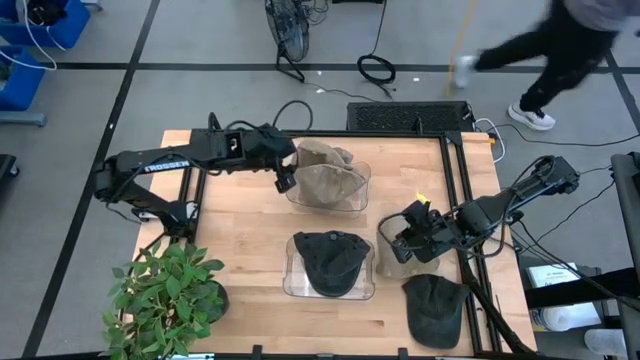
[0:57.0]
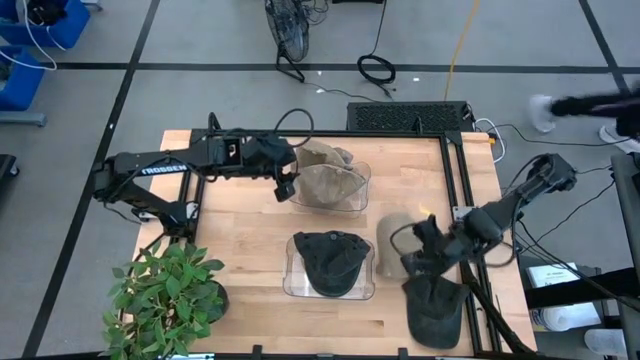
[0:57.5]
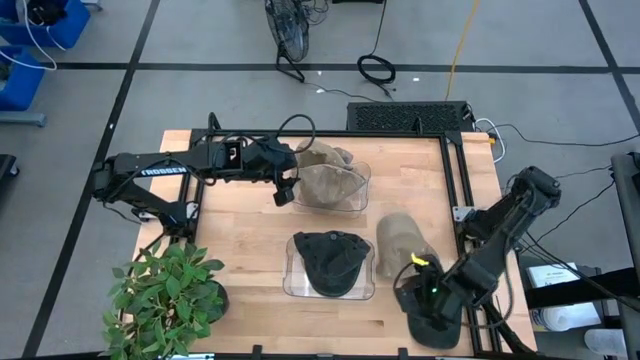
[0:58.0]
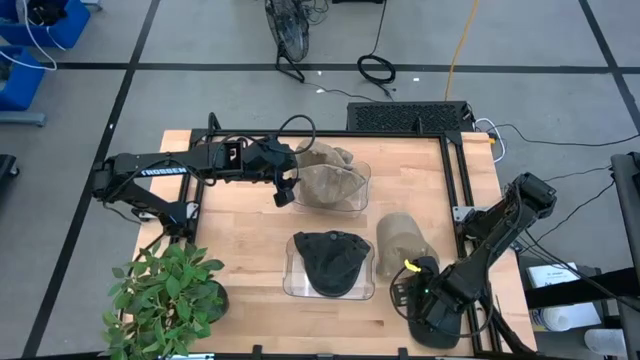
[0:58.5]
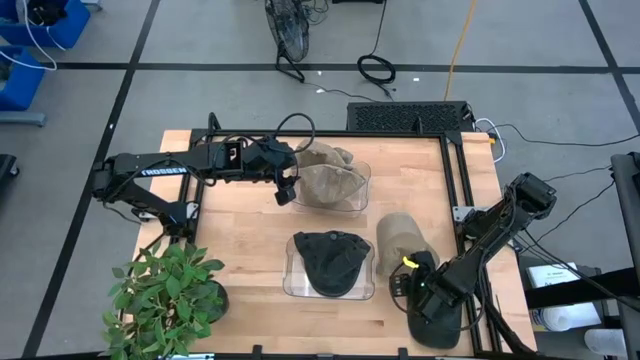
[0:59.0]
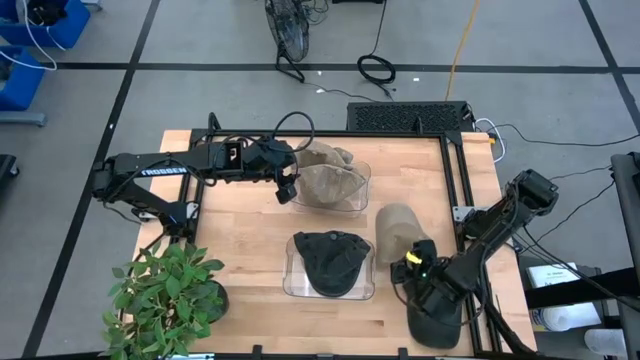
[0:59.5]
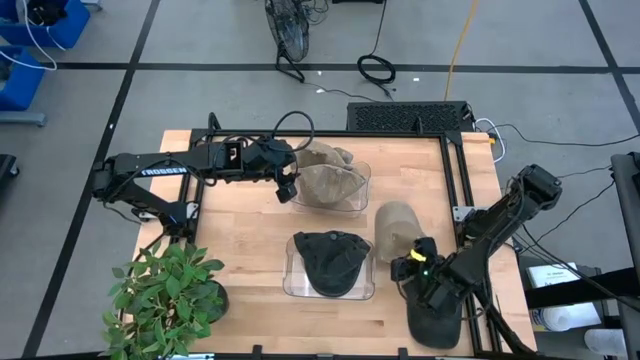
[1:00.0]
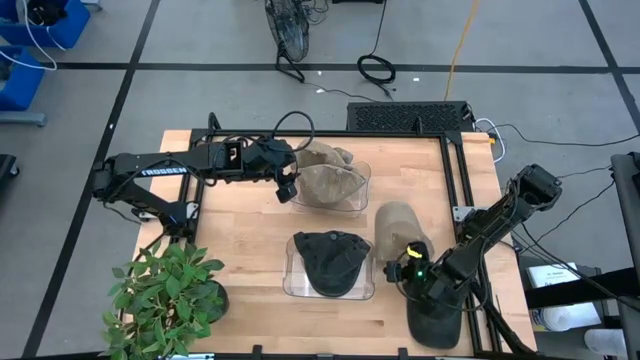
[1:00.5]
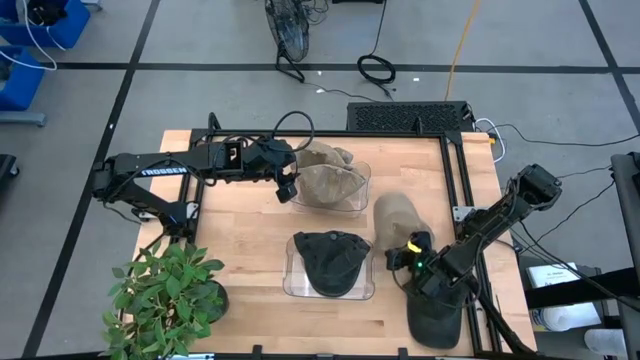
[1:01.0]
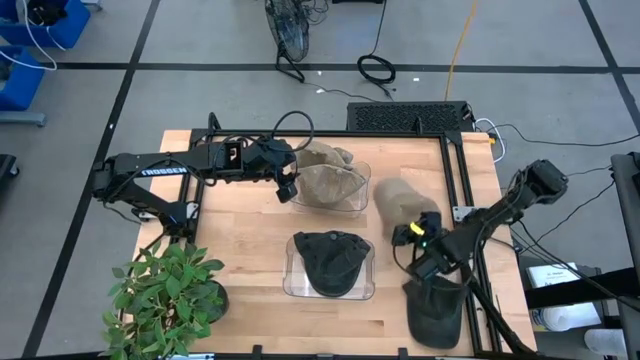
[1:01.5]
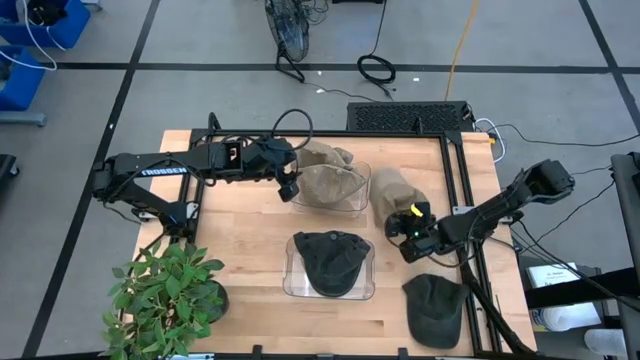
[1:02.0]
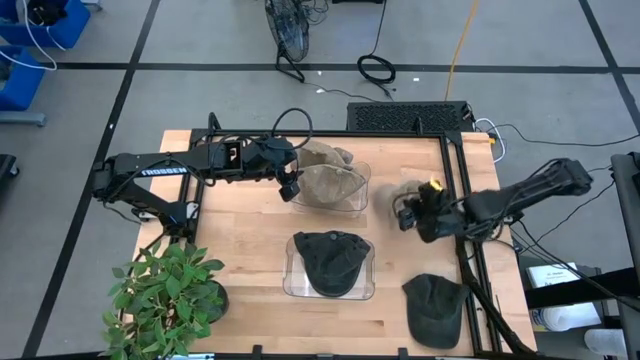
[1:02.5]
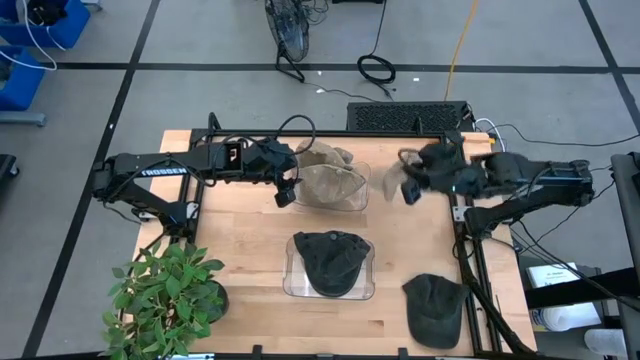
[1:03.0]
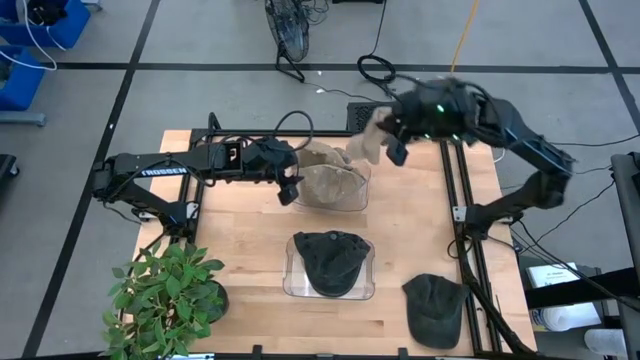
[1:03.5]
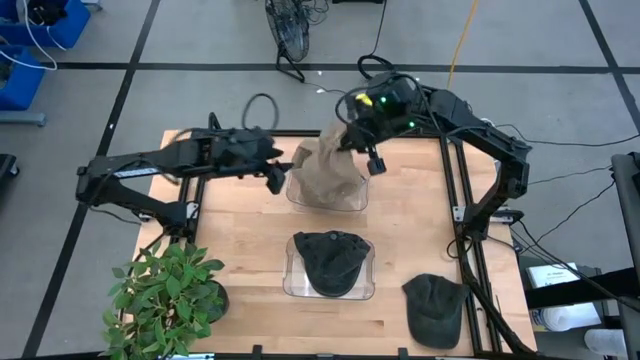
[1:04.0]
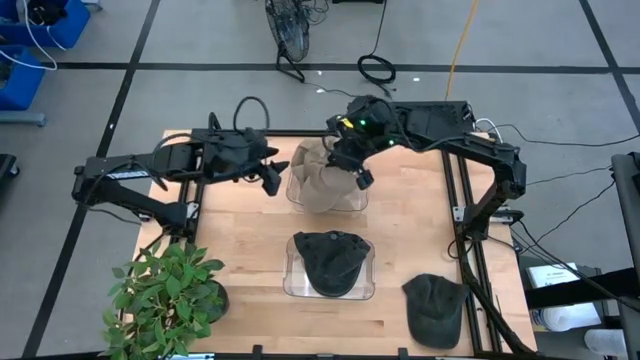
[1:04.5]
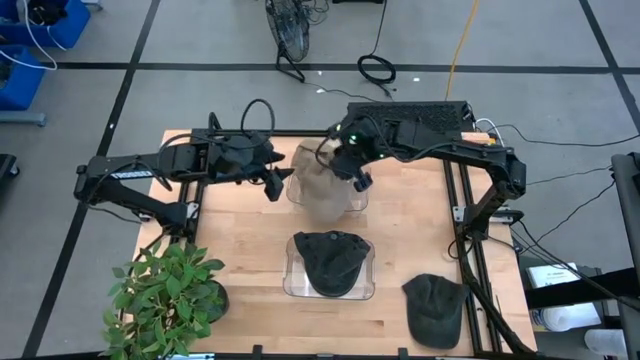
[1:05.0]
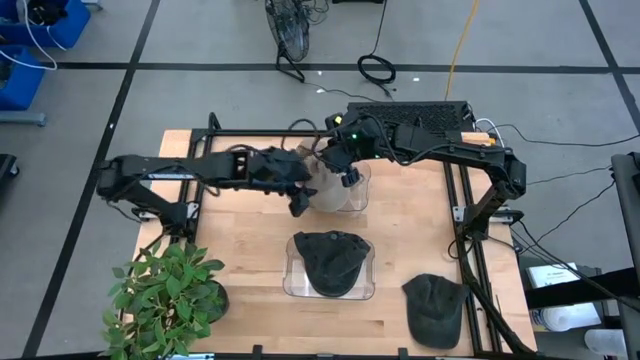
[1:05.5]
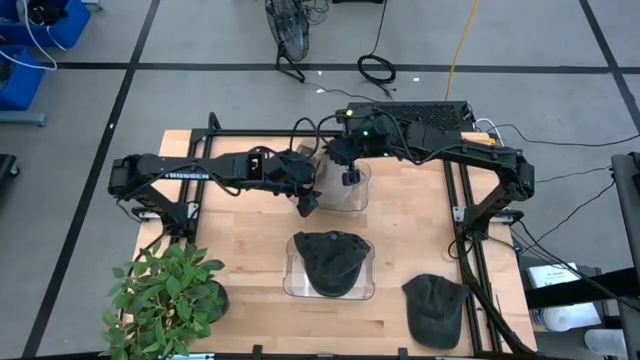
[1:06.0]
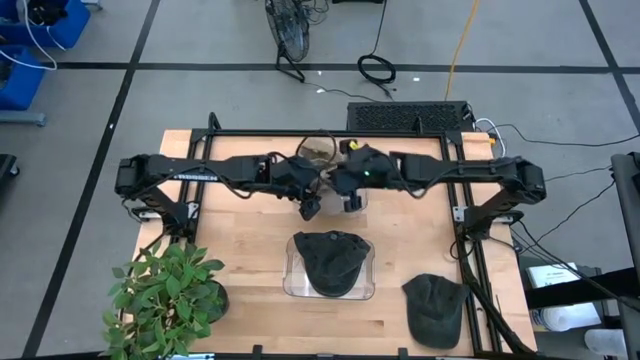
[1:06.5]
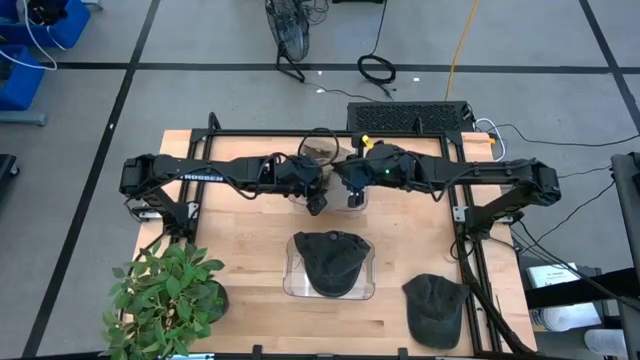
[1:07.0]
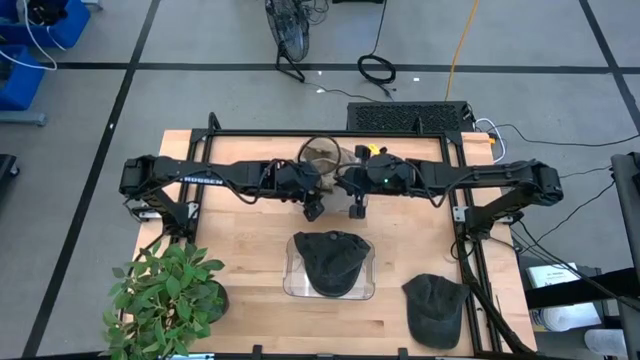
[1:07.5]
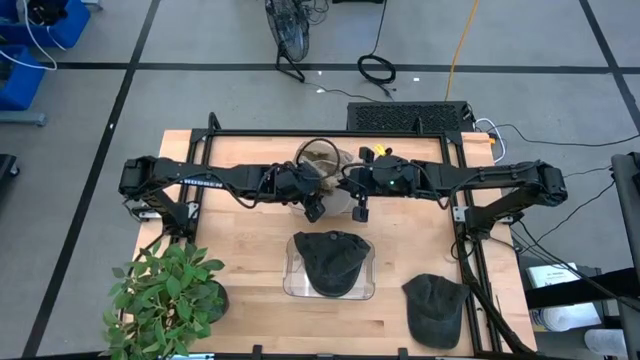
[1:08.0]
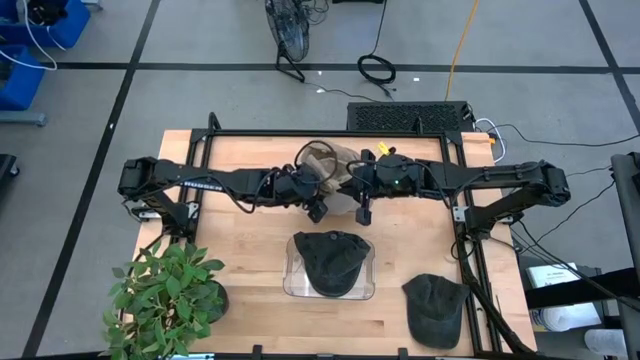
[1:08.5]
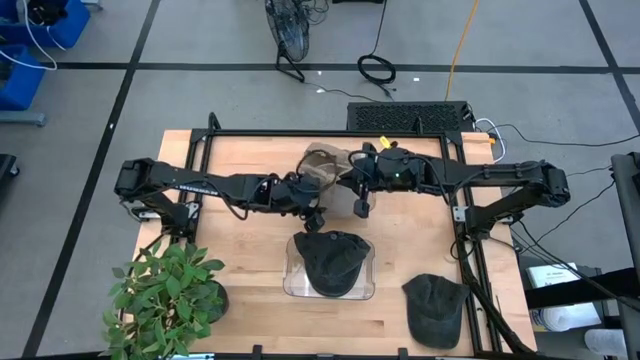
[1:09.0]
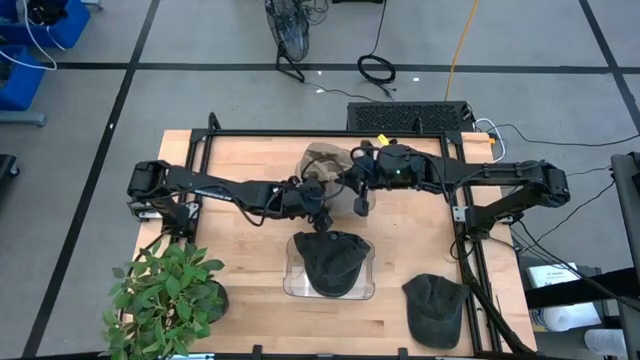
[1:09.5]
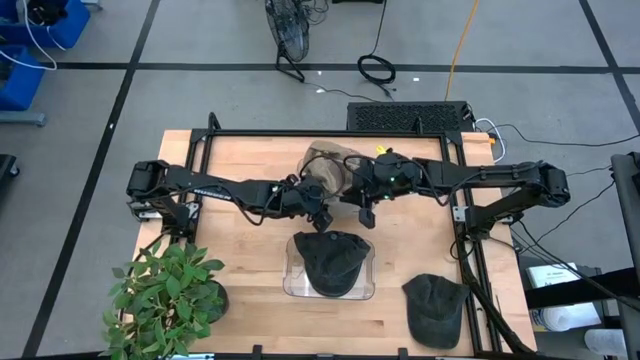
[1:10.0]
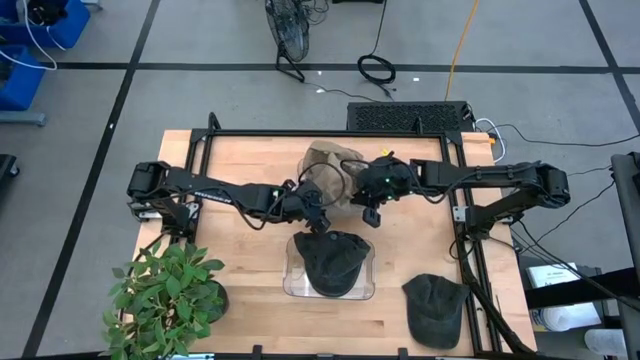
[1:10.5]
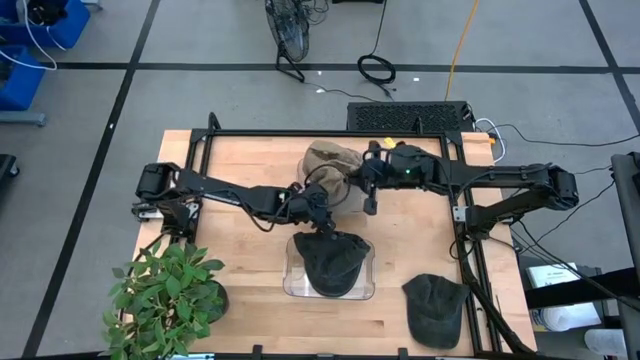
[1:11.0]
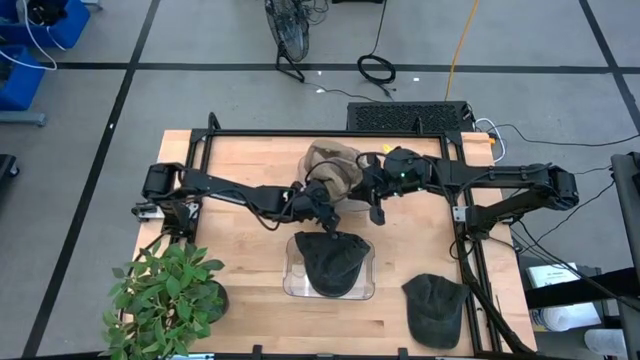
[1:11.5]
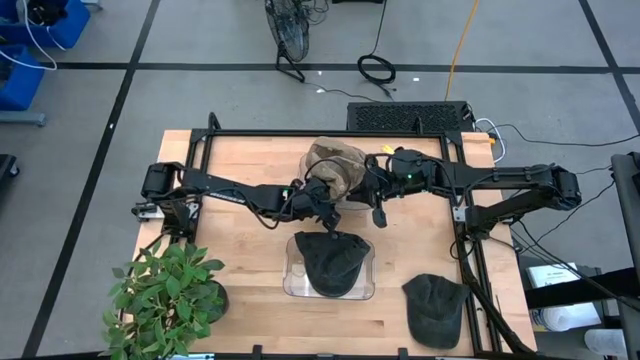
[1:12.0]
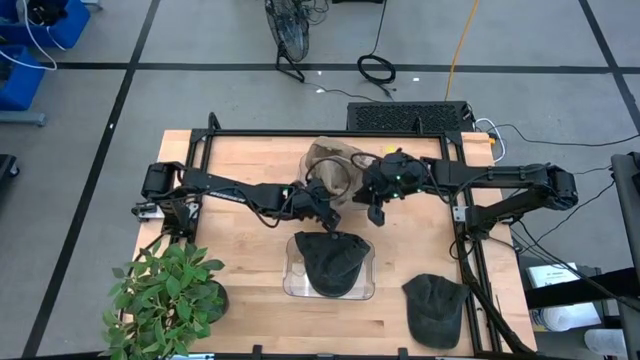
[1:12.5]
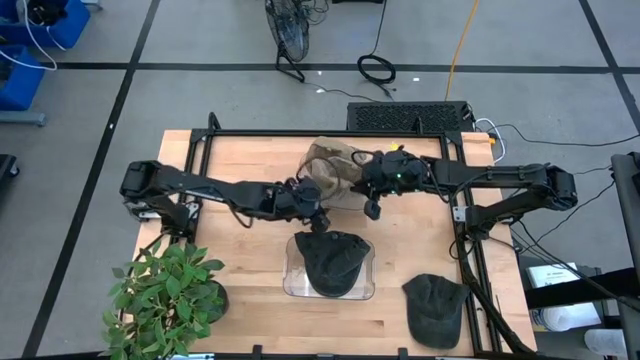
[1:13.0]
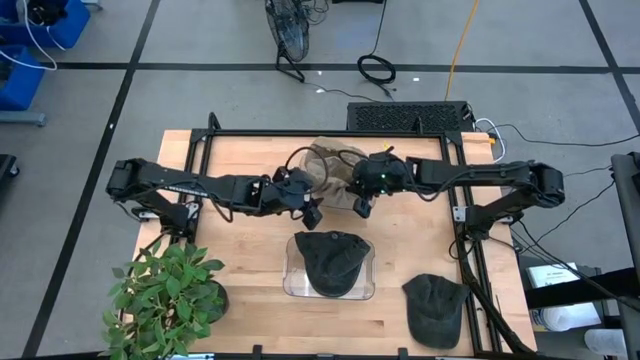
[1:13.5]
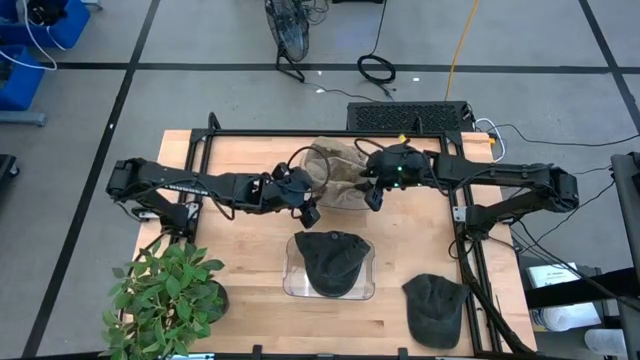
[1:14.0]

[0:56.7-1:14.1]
Task: Pick & Place hat
Put the brown cap into the top transparent bin

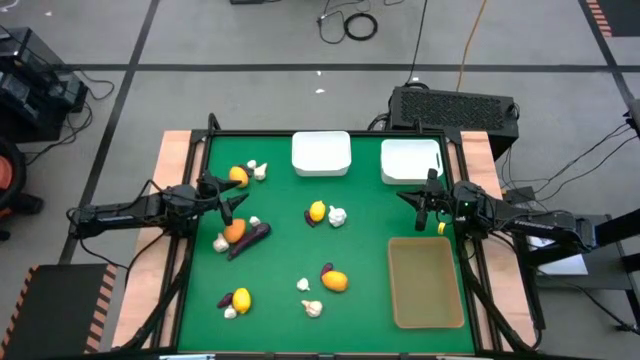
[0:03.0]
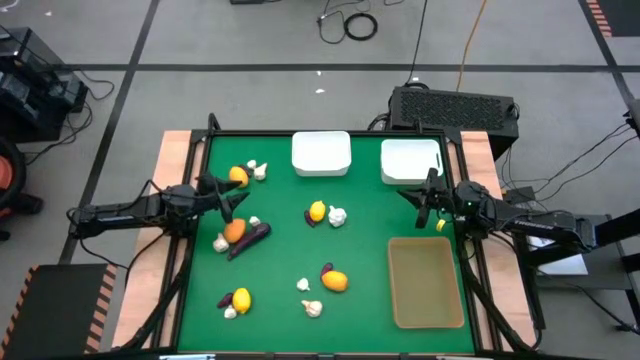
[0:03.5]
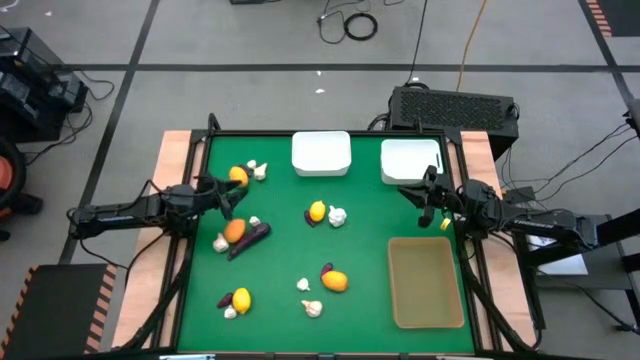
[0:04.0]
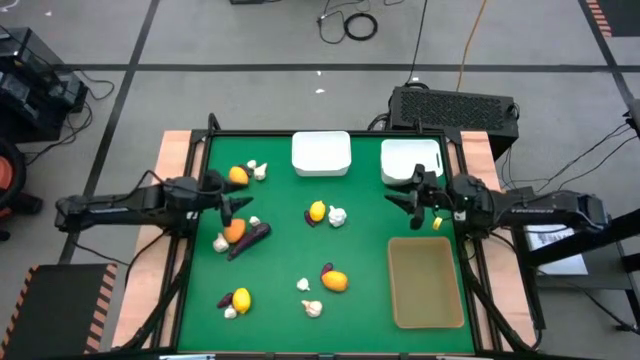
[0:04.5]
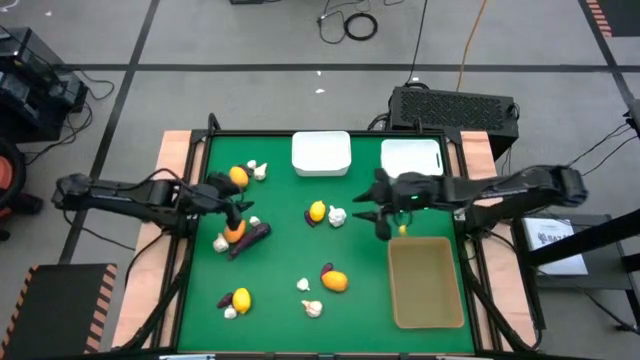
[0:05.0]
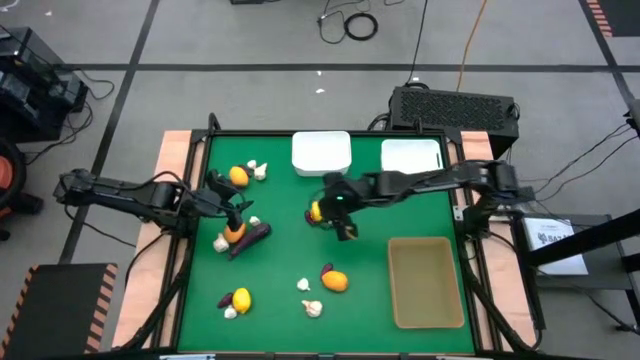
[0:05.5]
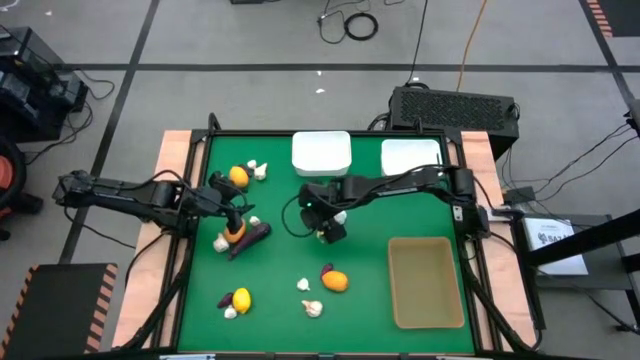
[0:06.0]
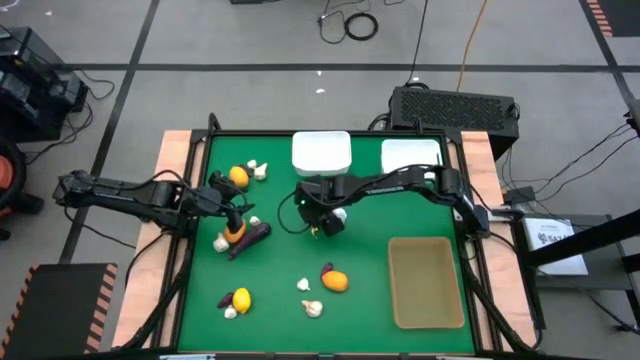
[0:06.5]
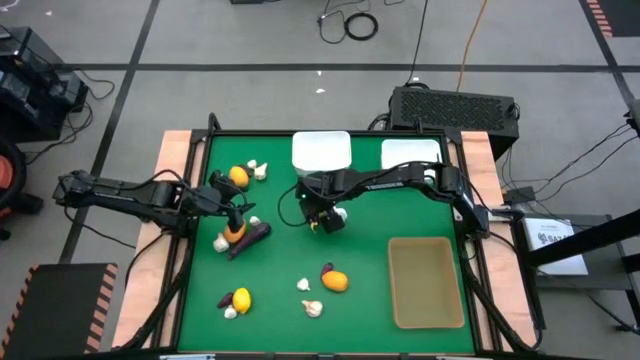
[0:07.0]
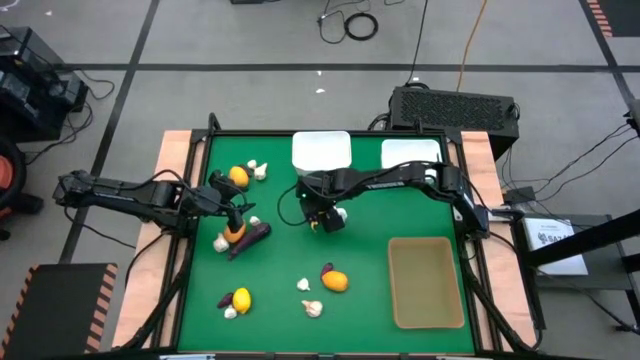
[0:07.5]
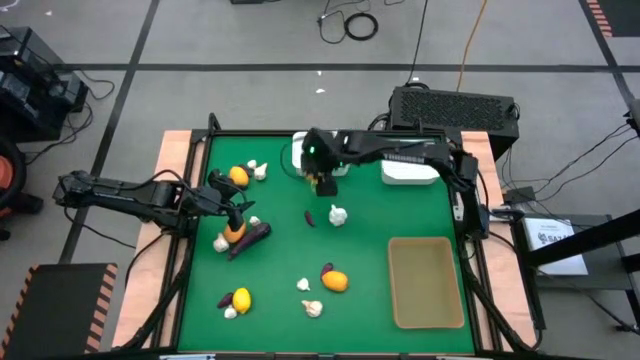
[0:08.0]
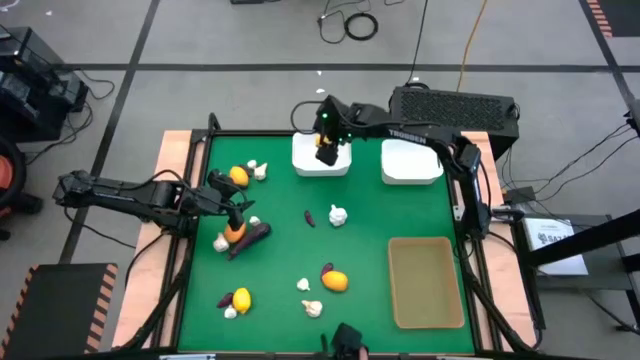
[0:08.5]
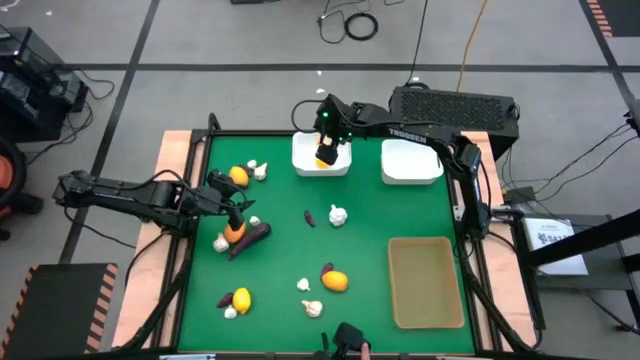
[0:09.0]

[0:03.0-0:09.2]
Task: Sort produce into baskets
Put the lemon into the left white bin
